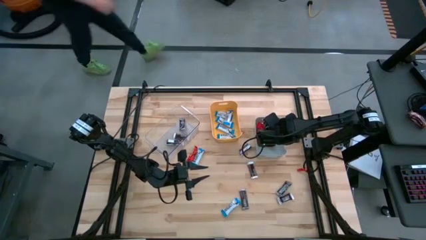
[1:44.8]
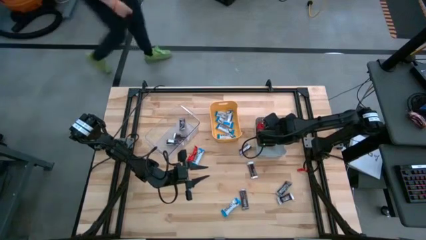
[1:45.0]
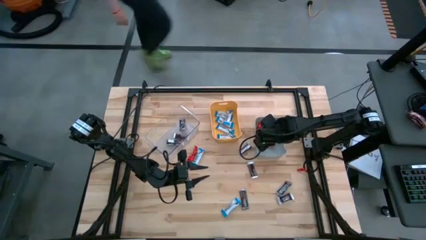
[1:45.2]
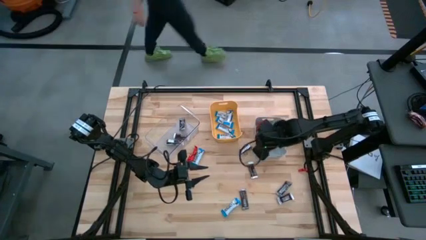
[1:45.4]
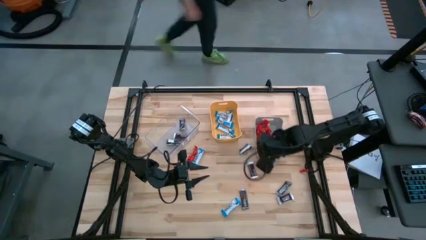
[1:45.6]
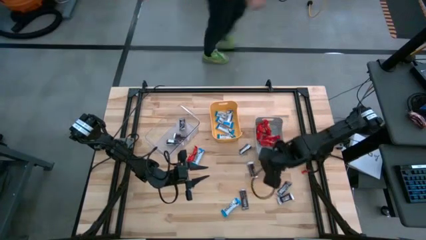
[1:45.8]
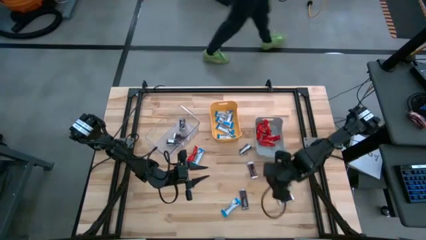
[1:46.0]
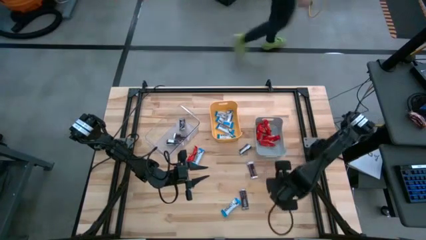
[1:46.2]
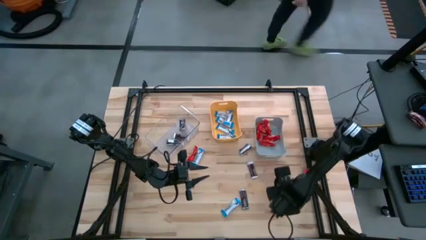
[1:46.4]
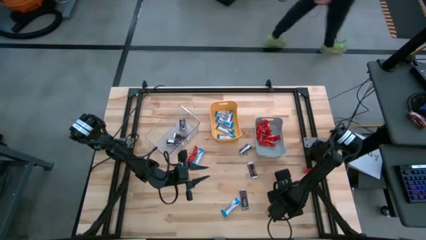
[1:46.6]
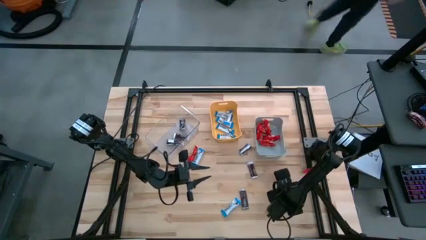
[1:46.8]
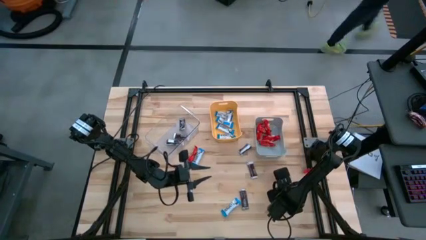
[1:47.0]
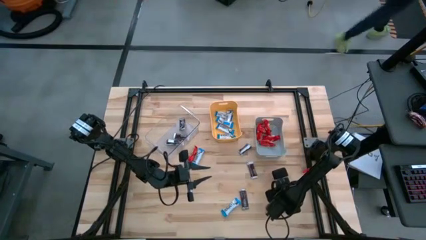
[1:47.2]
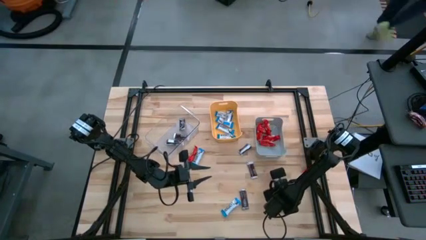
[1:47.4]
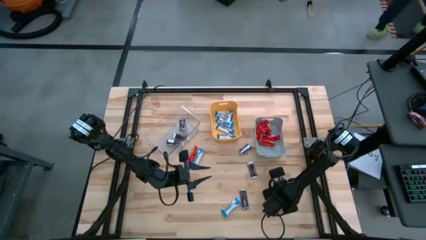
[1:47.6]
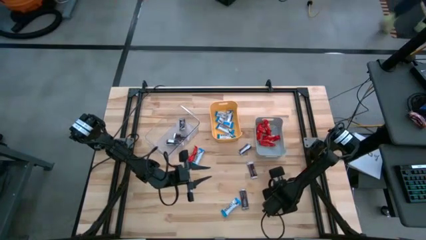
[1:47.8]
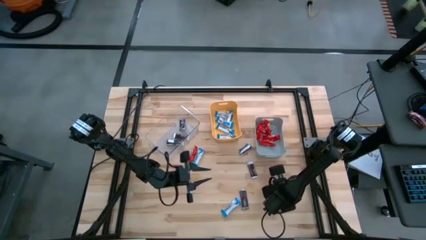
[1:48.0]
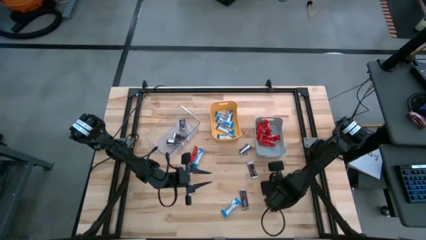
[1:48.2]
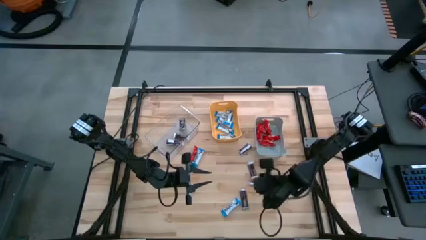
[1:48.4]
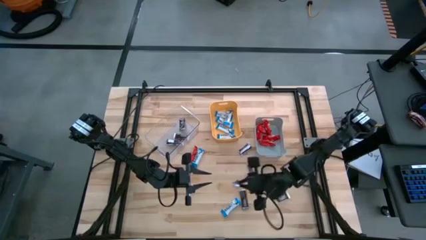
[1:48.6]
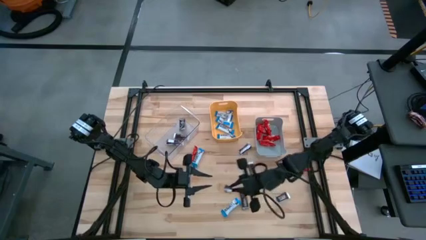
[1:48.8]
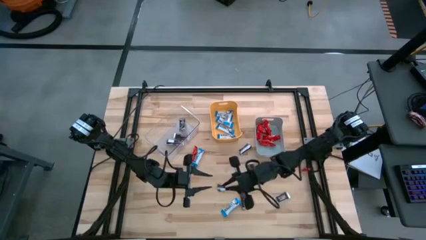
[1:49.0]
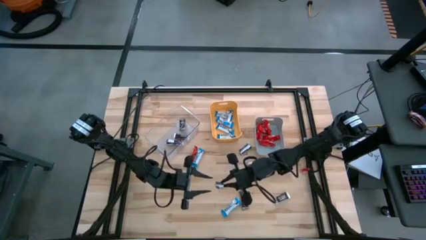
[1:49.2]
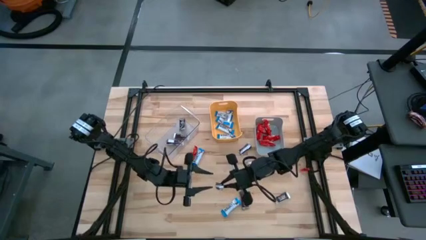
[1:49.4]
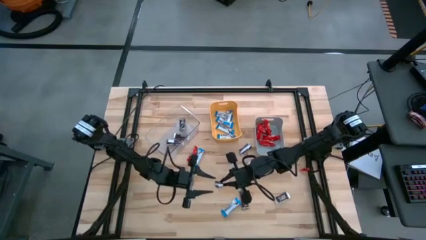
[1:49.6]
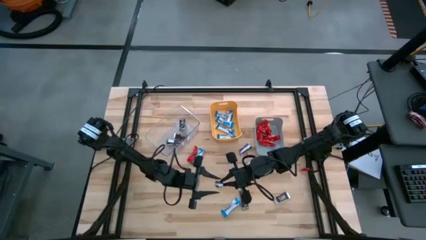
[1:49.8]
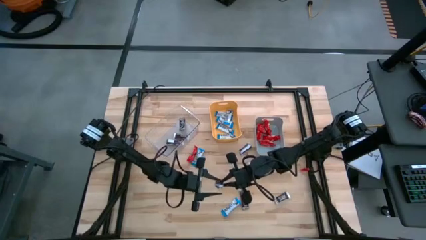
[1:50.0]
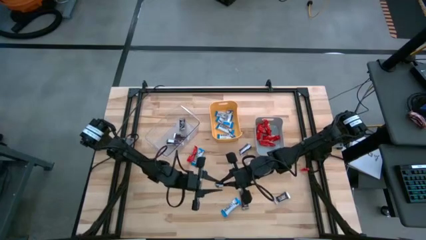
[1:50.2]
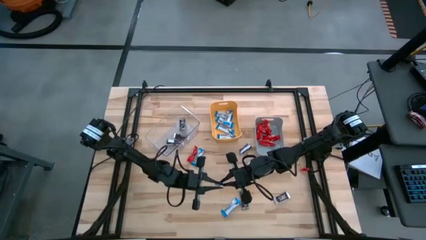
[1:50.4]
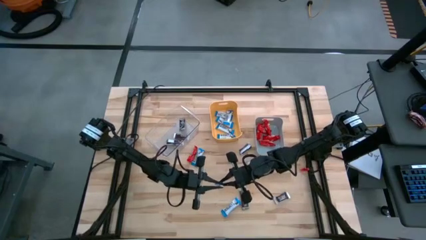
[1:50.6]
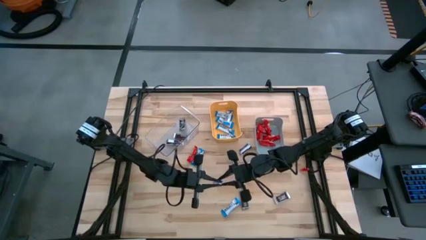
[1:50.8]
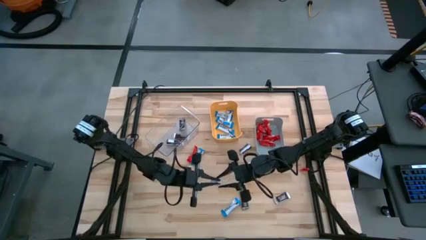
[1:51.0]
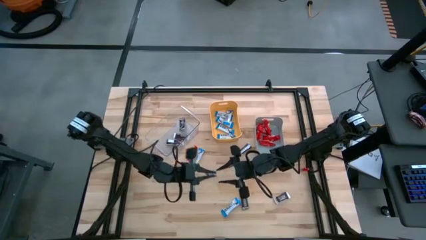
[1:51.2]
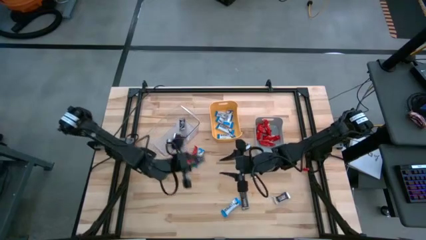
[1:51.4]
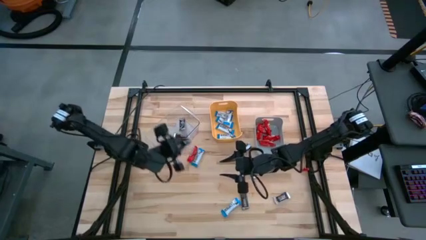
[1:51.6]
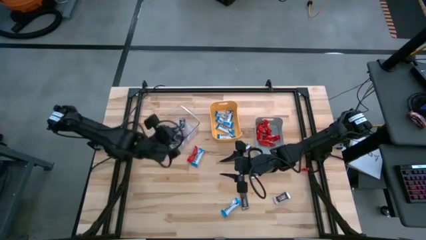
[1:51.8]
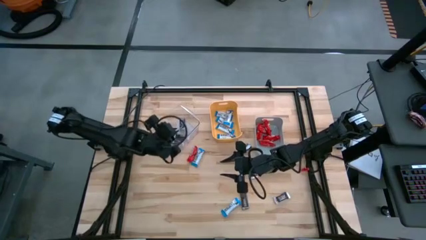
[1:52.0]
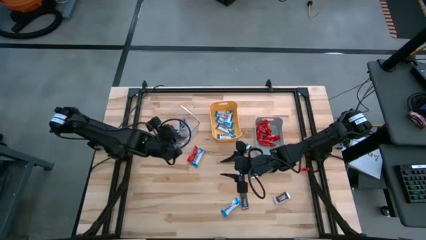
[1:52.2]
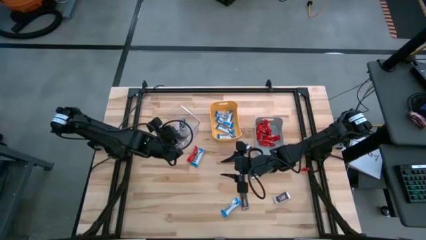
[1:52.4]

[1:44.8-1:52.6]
Task: Organize candy in baskets
Put the brown chocolate into the transparent bin

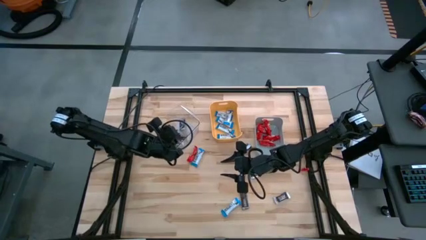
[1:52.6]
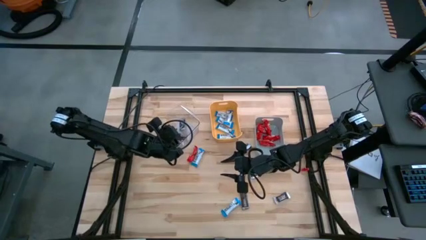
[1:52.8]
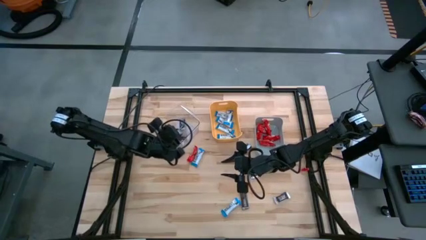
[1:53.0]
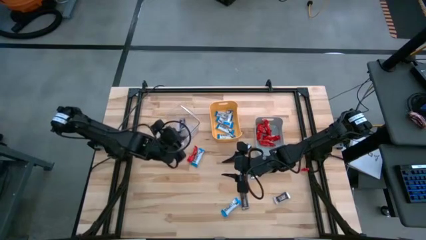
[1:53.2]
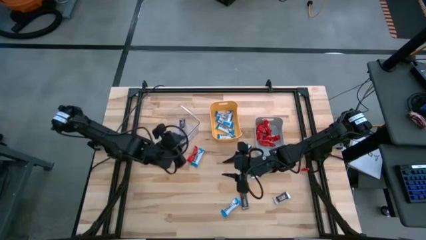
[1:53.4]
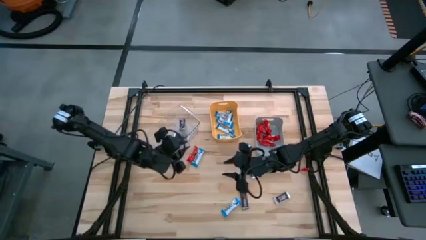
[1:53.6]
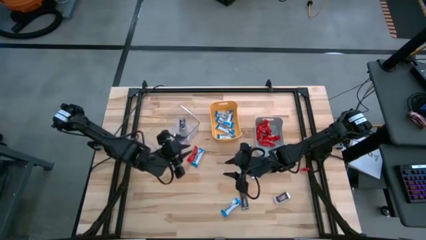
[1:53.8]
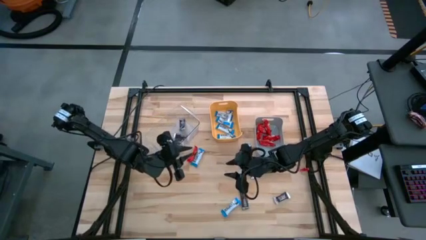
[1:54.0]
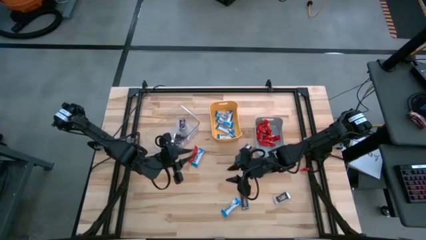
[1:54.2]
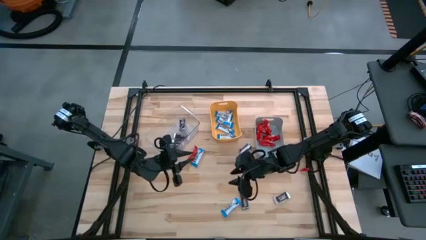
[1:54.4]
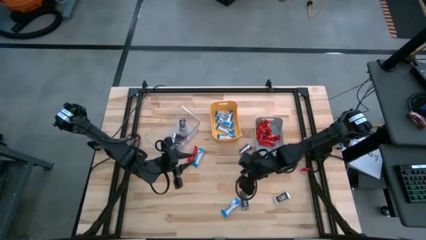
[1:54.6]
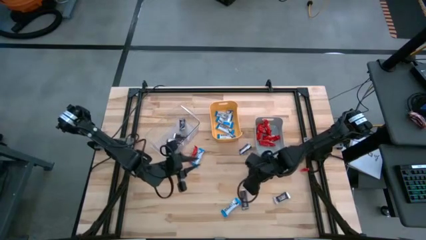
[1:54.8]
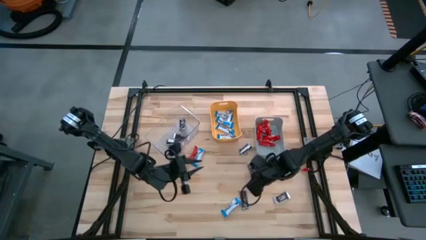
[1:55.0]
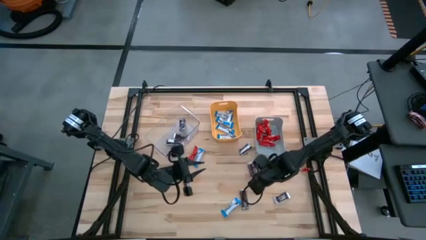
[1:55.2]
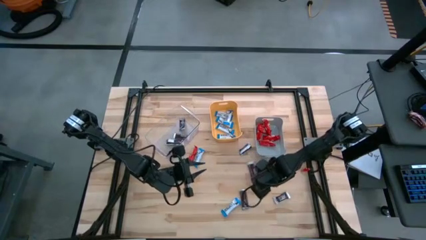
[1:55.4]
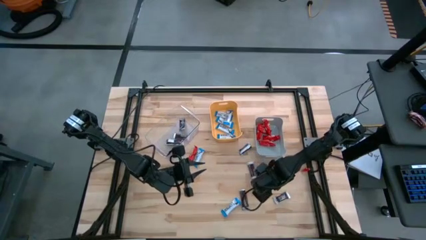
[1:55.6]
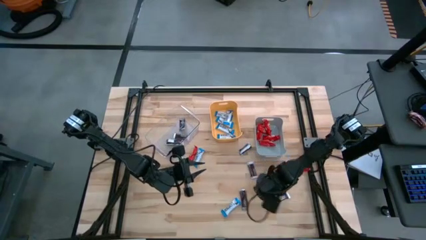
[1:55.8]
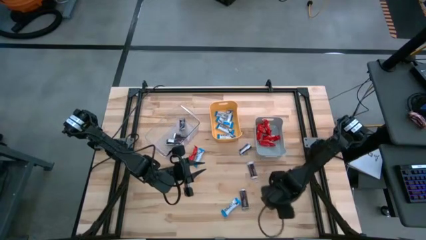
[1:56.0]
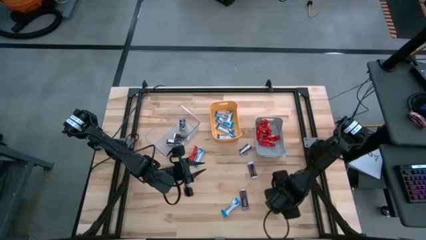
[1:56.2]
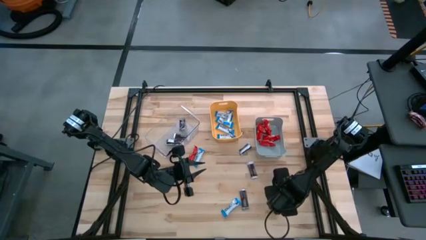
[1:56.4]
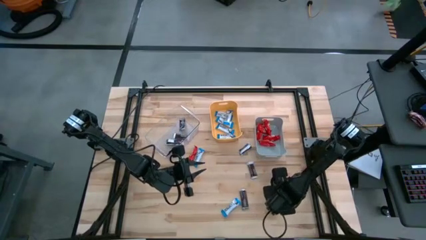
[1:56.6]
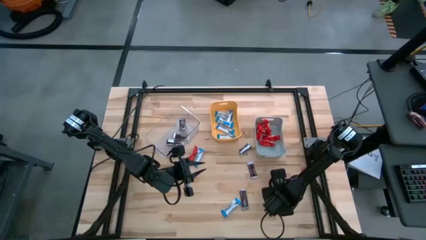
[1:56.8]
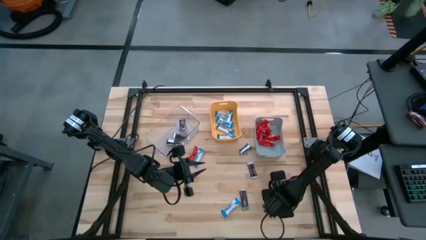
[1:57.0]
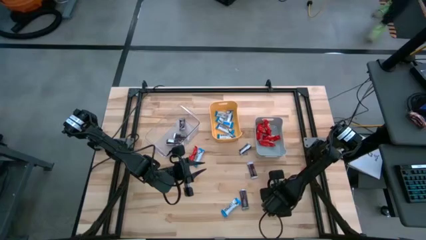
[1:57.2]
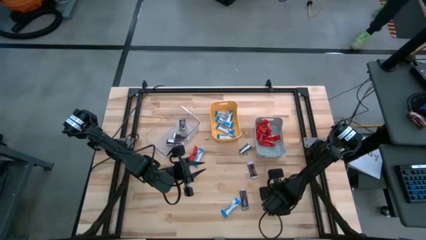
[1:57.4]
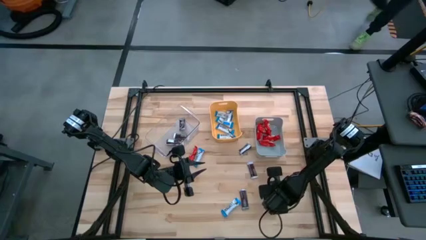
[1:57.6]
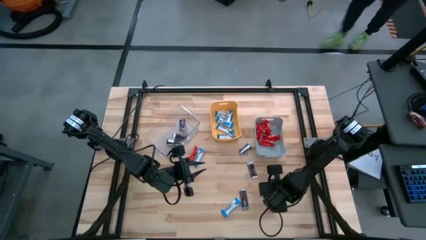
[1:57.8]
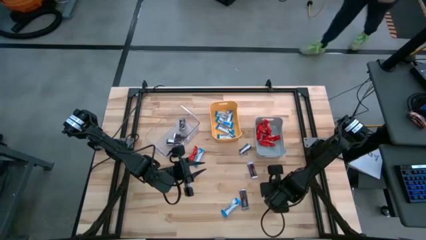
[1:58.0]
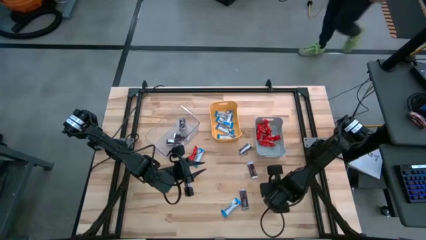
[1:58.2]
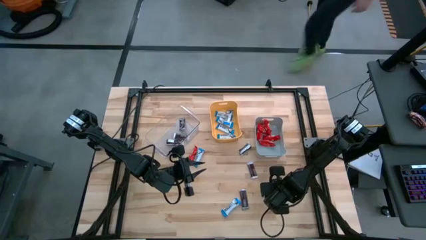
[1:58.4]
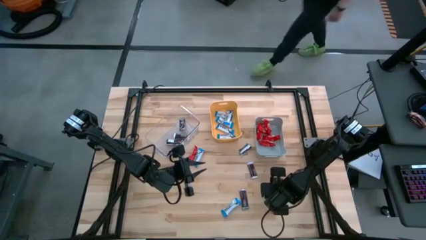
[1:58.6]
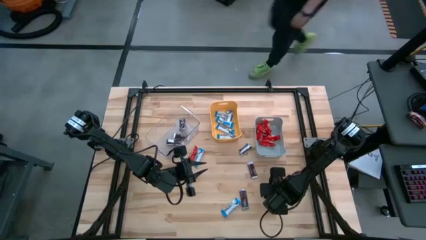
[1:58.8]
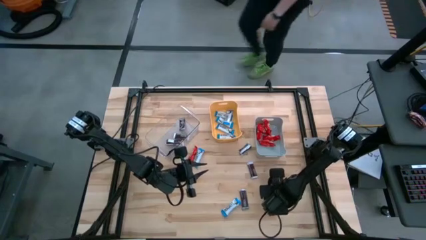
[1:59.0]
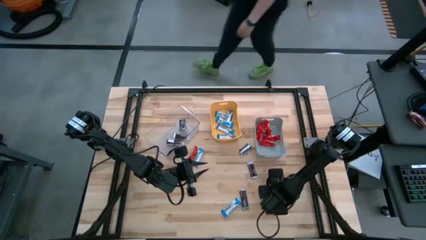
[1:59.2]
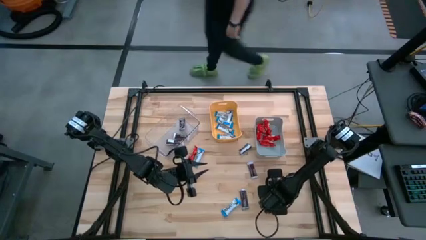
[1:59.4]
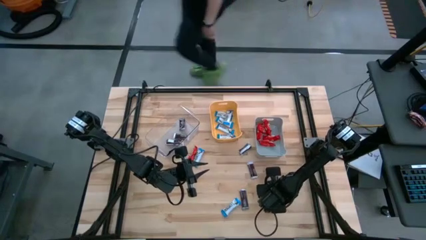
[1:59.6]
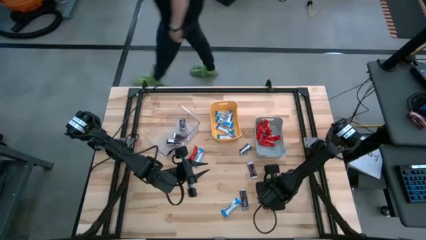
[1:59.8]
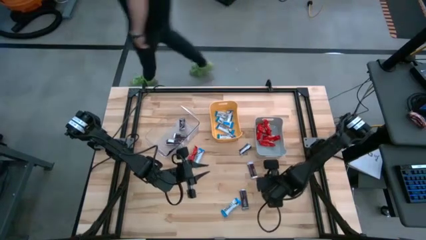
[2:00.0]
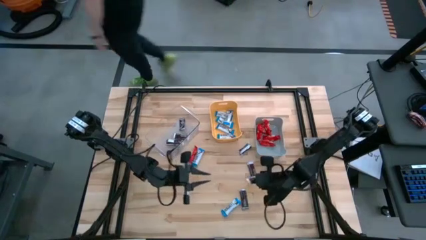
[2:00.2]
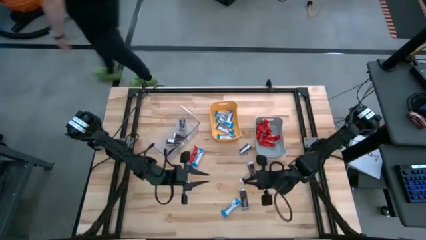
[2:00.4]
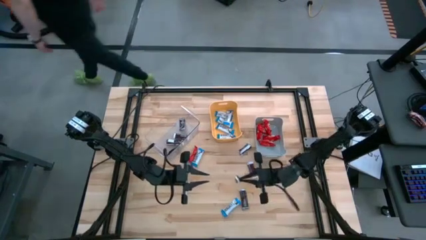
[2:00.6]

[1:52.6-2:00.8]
Put the brown chocolate into the transparent bin

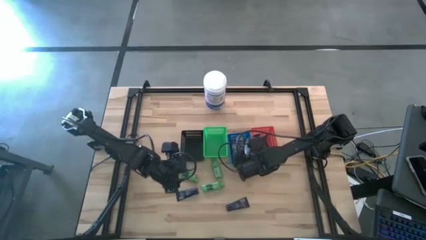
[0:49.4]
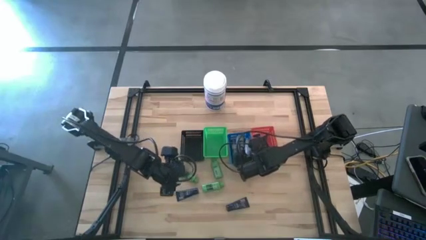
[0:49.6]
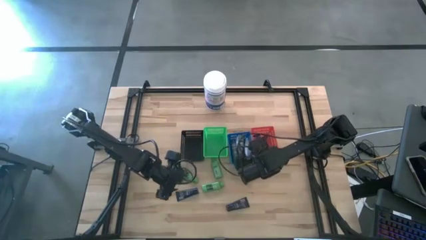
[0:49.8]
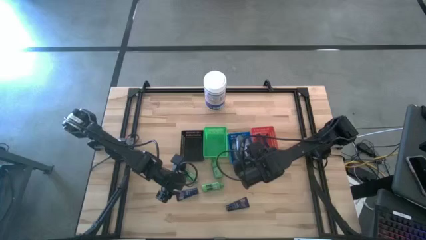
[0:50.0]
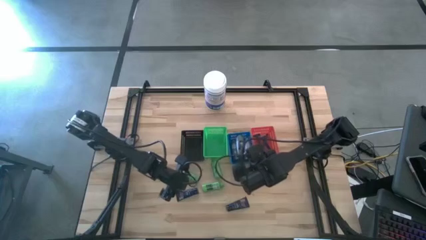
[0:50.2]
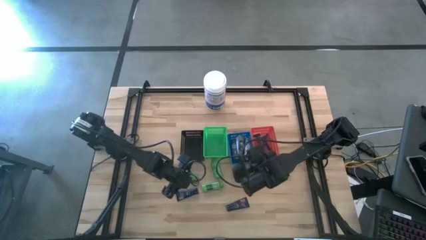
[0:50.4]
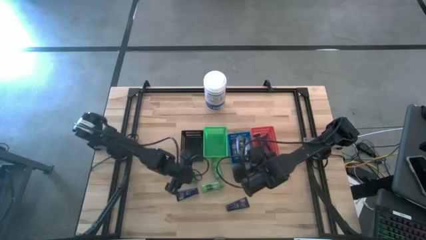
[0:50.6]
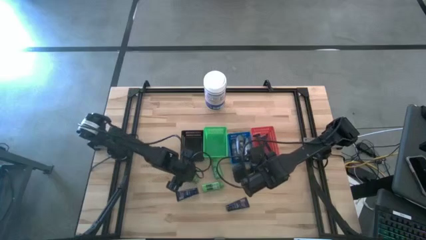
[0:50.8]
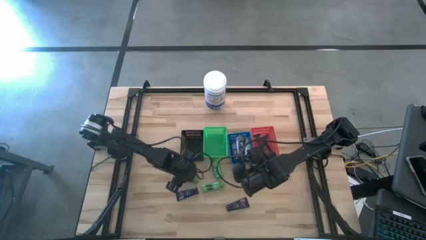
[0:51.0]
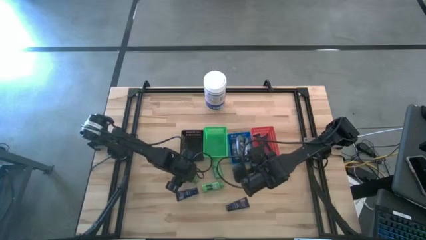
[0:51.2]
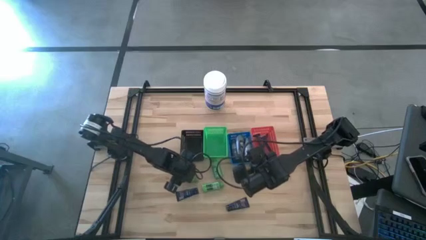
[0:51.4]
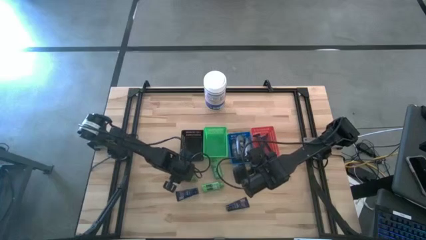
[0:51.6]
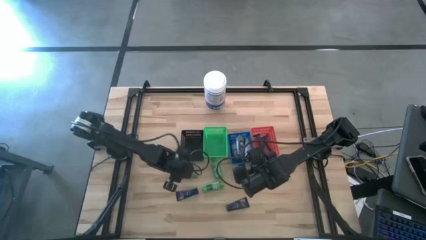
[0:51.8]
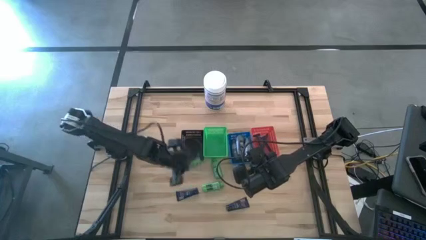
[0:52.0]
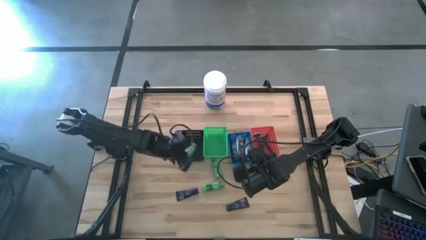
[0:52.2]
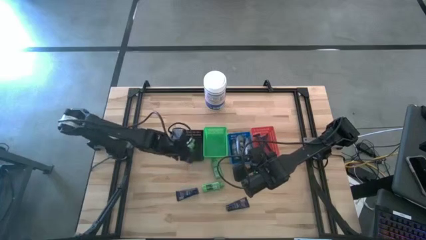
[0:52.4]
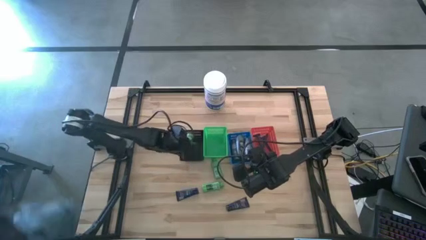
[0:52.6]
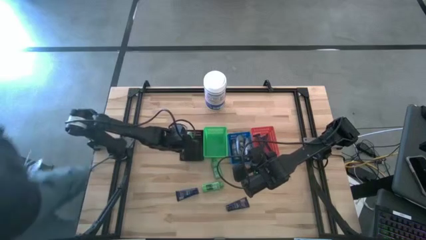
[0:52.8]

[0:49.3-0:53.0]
Task: Pick & Place Travel size toiletries
Put the shampoo into the black basket
